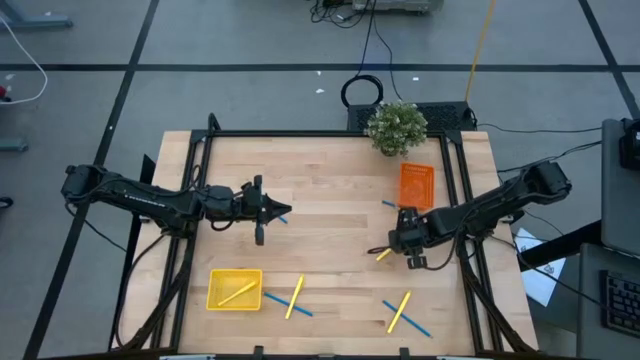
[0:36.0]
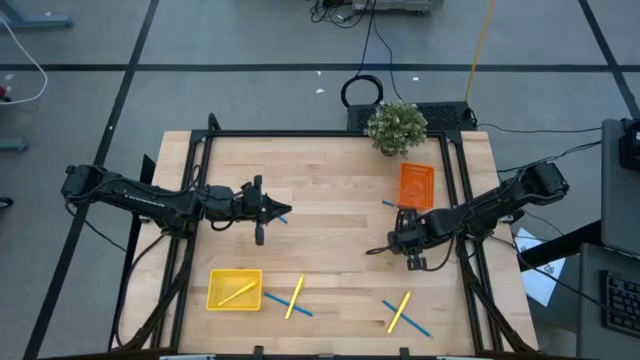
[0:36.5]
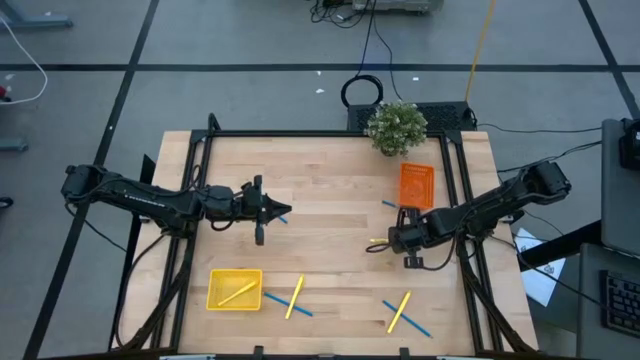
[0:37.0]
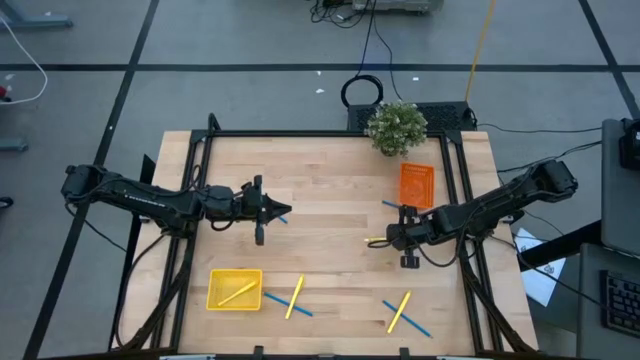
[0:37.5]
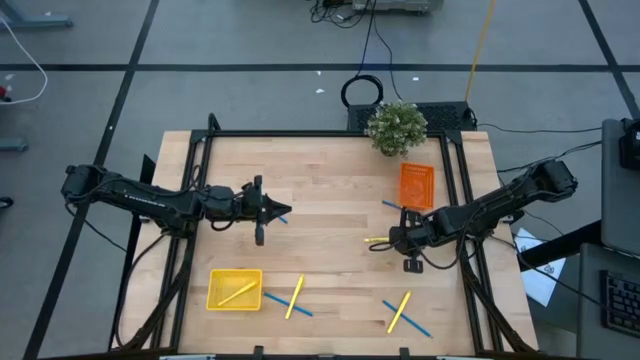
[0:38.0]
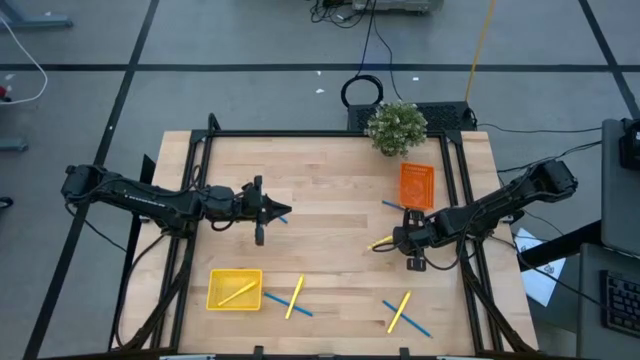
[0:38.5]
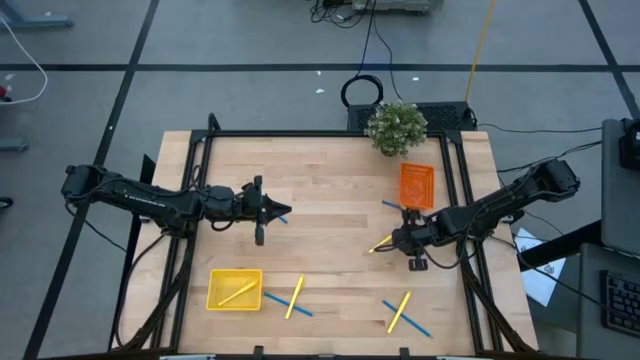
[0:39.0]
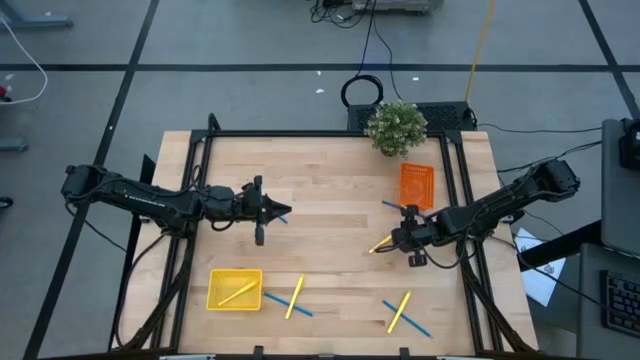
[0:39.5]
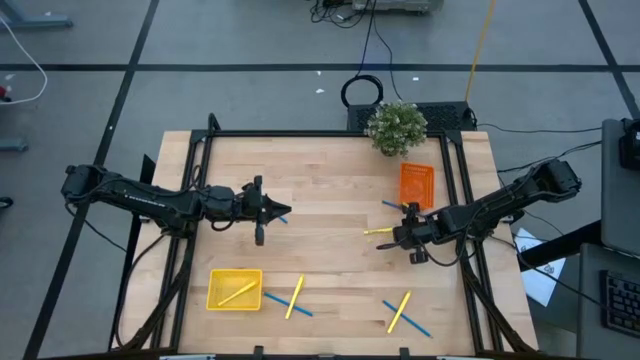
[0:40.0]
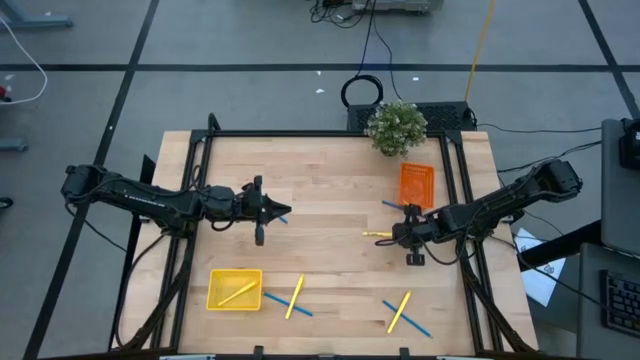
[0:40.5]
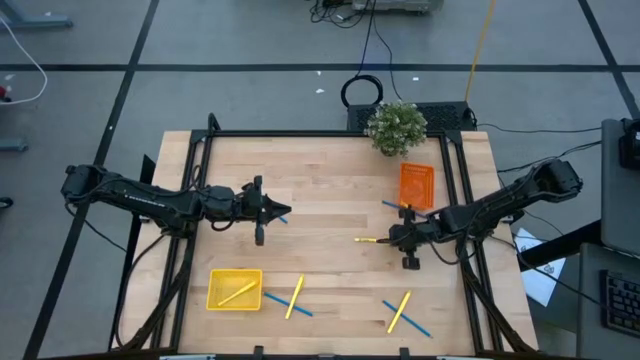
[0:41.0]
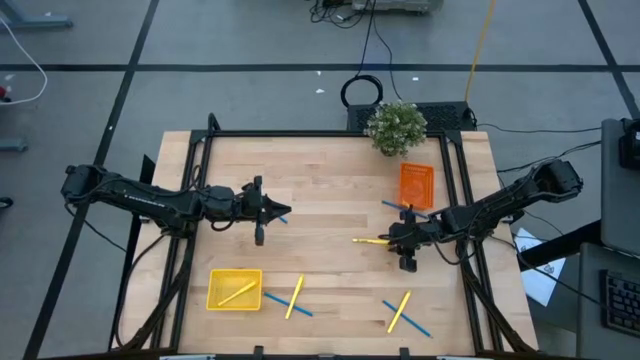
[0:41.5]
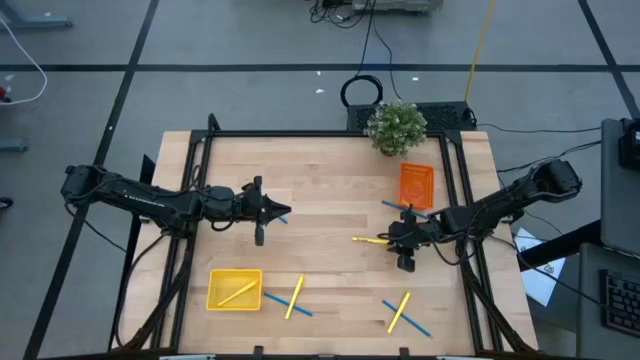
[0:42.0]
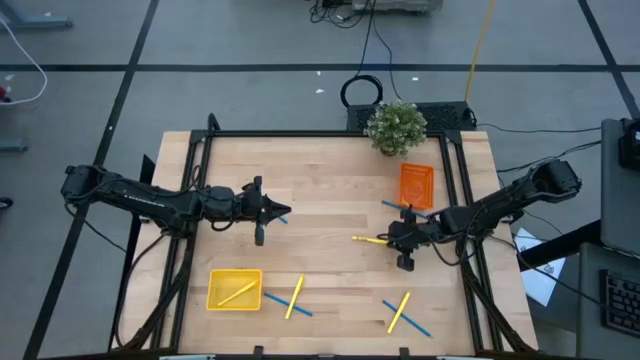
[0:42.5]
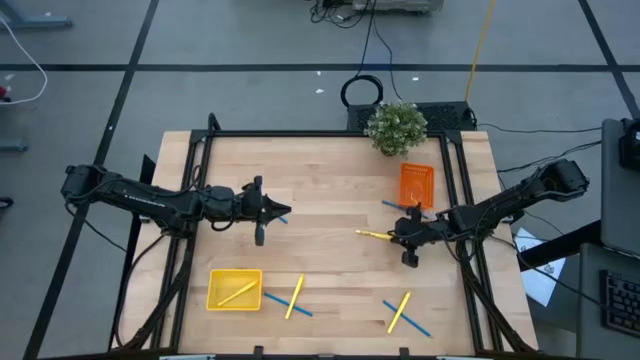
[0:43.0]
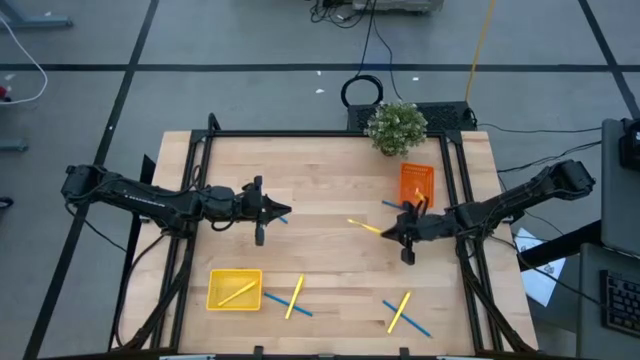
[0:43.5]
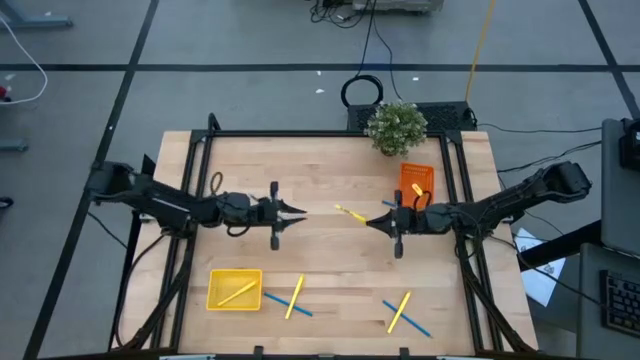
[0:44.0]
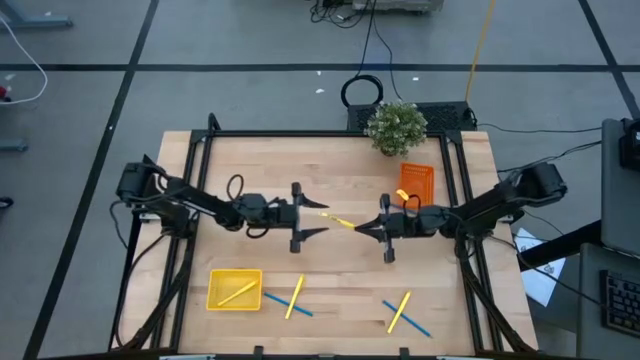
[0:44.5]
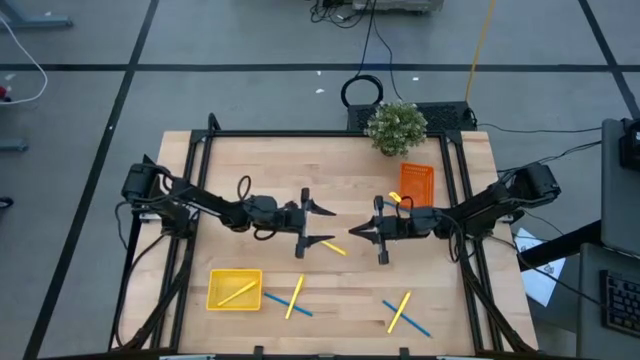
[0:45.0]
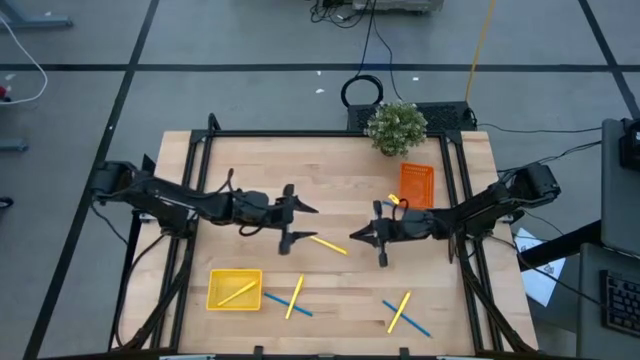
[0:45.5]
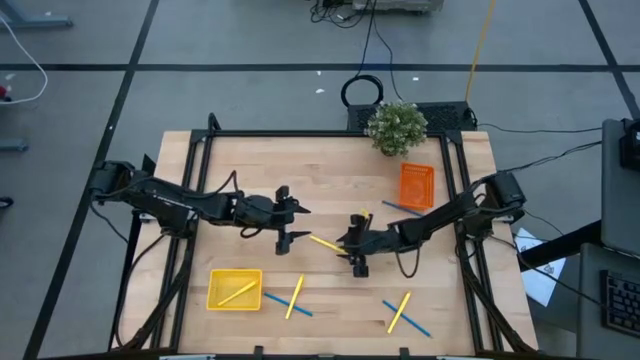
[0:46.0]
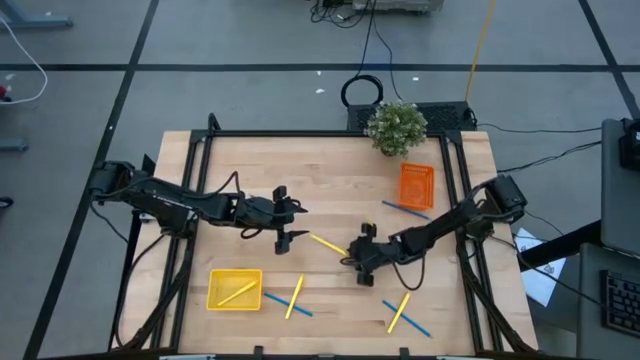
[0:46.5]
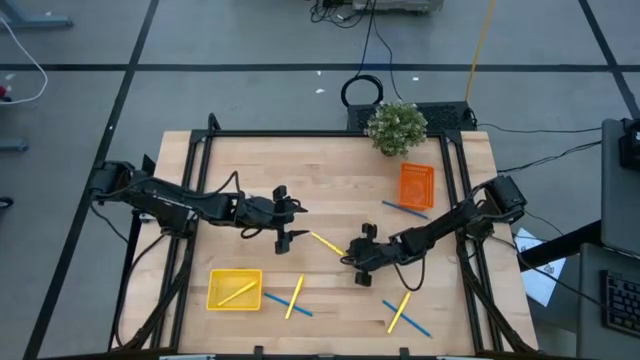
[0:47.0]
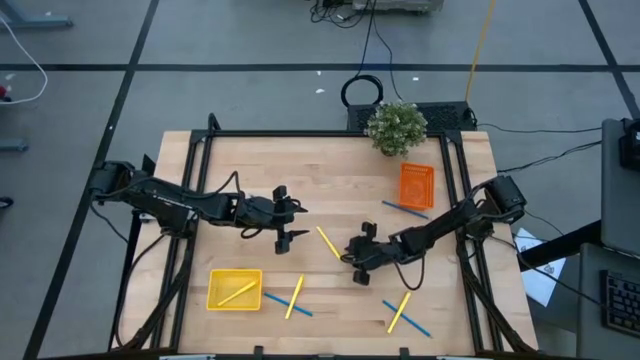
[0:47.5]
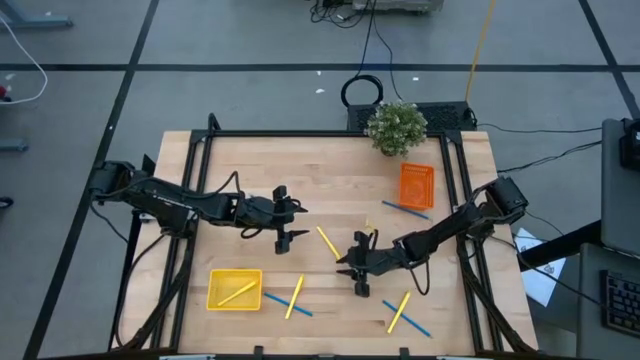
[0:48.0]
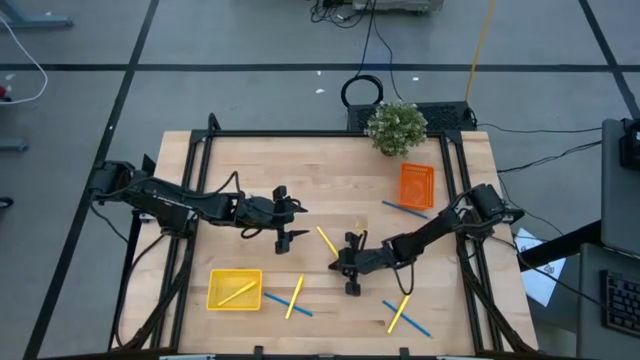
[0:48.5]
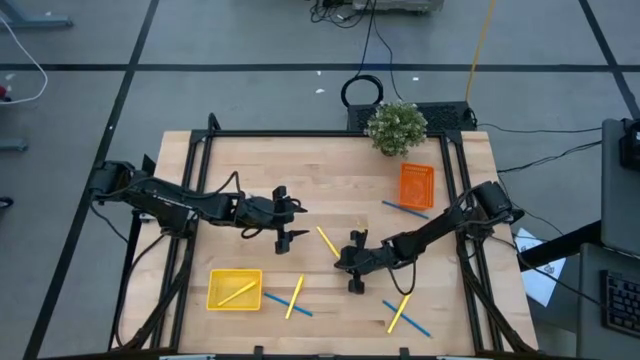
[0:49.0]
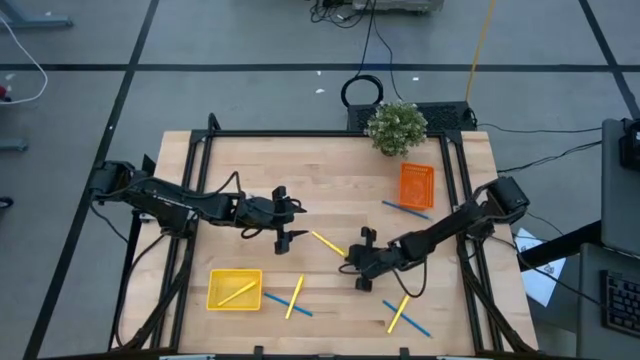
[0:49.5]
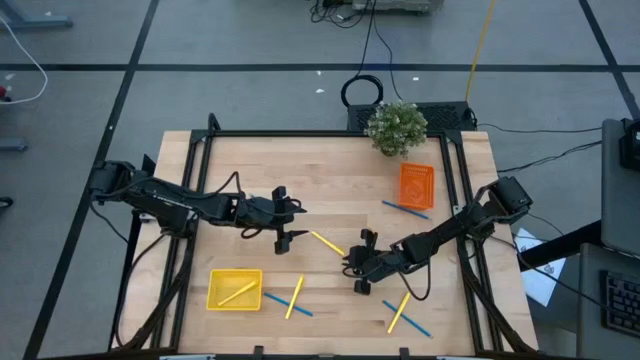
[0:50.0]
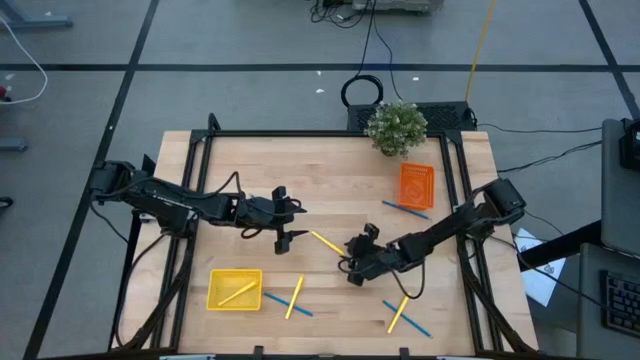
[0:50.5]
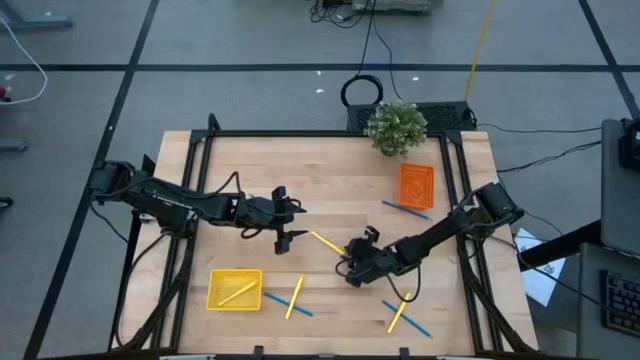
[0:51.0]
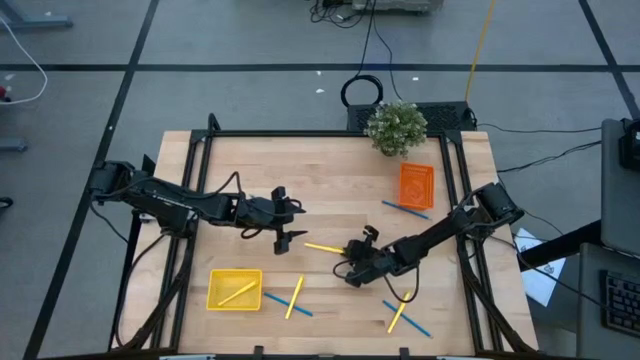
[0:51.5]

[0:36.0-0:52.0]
Task: Sort pens & pencils
Put the top left yellow ballpen into the yellow bin

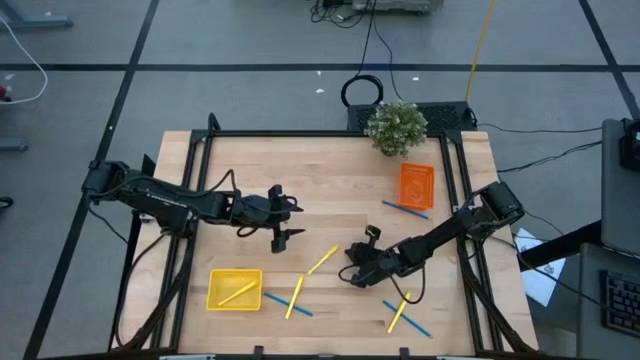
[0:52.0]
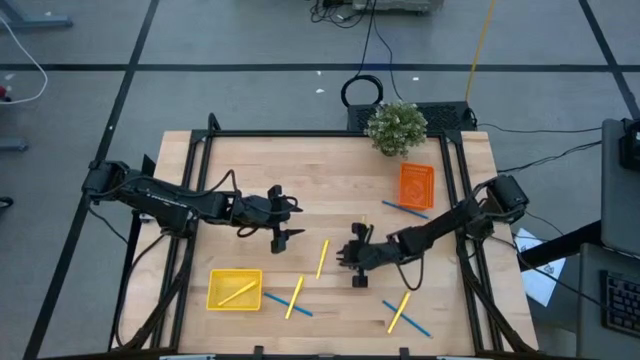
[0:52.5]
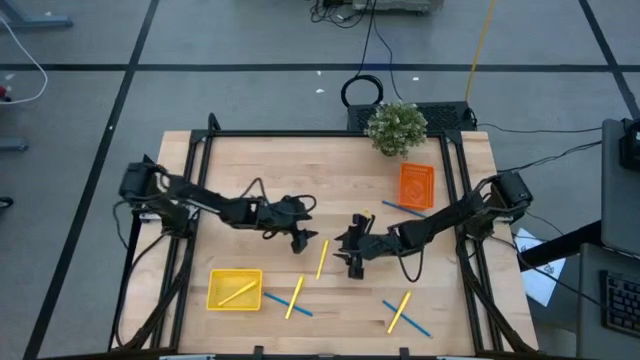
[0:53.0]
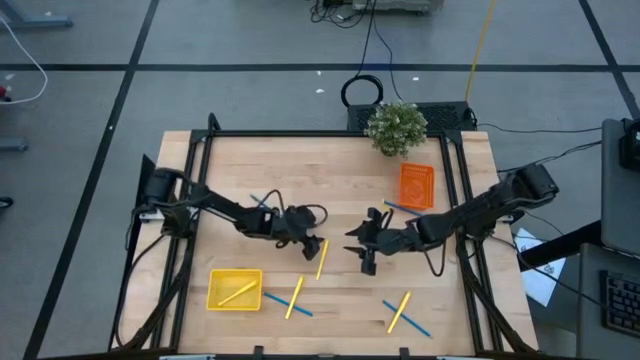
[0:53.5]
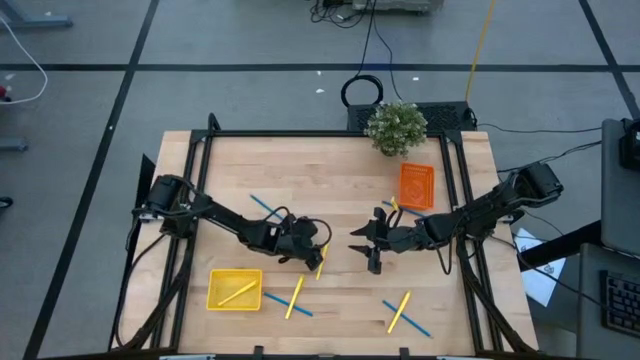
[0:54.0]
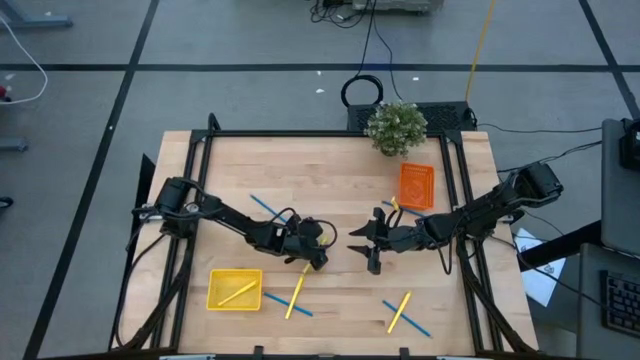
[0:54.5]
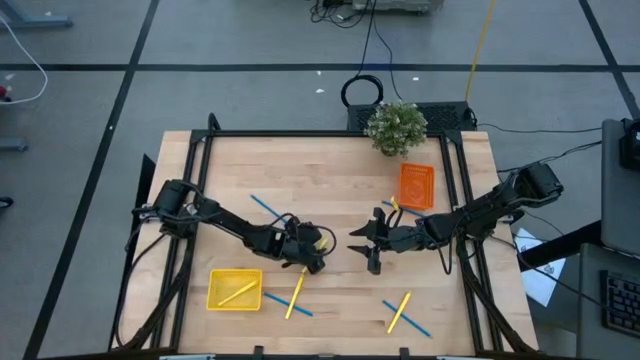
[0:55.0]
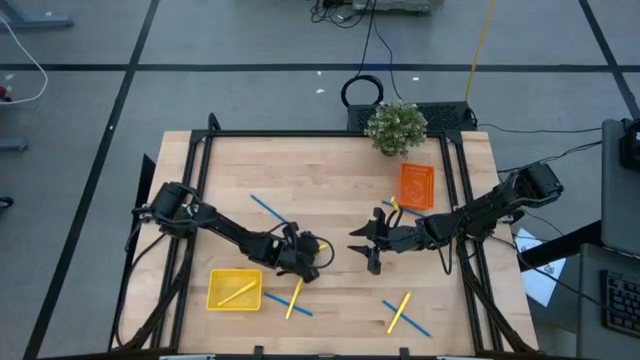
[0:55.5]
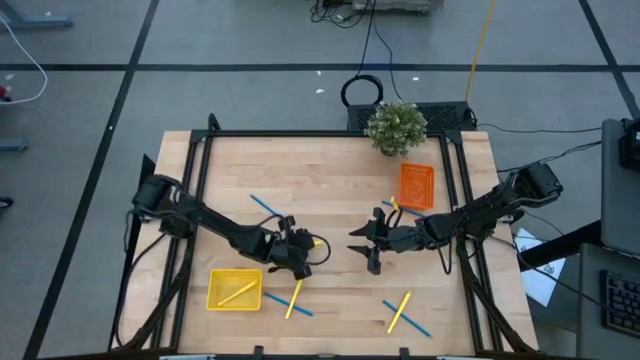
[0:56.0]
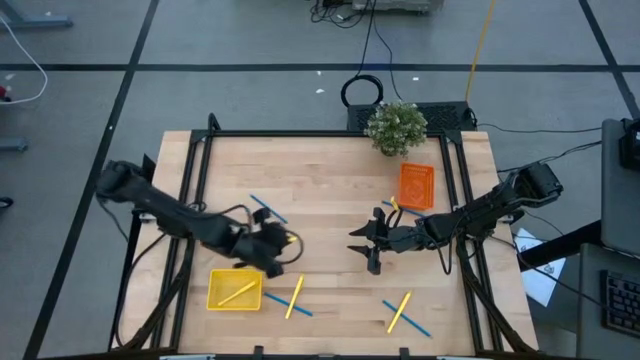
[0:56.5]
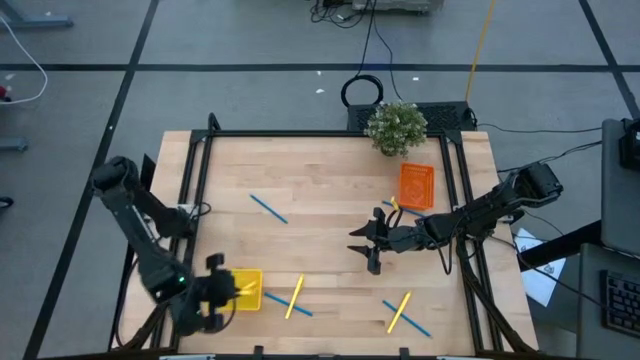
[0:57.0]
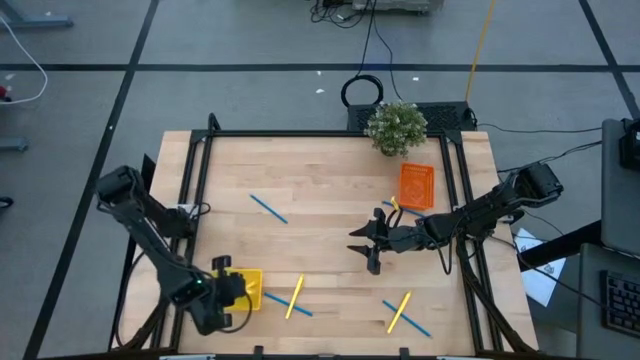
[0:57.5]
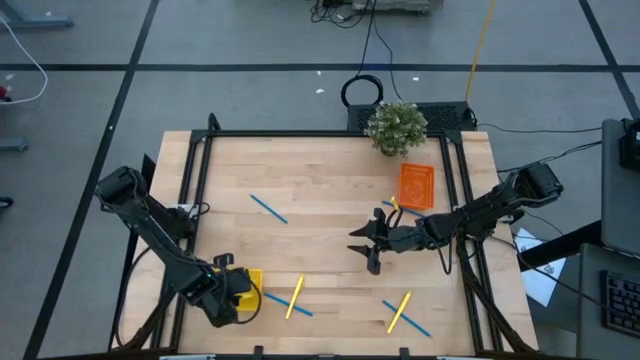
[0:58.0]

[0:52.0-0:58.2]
Put the top left yellow ballpen into the yellow bin
